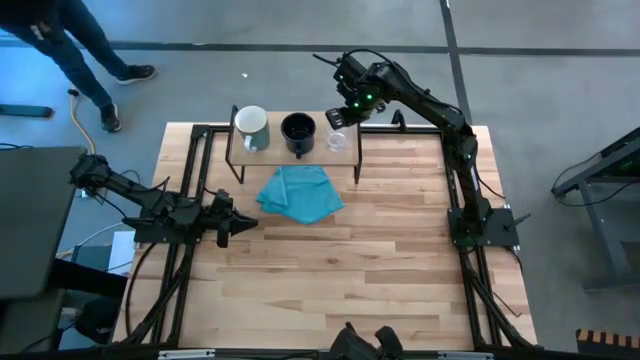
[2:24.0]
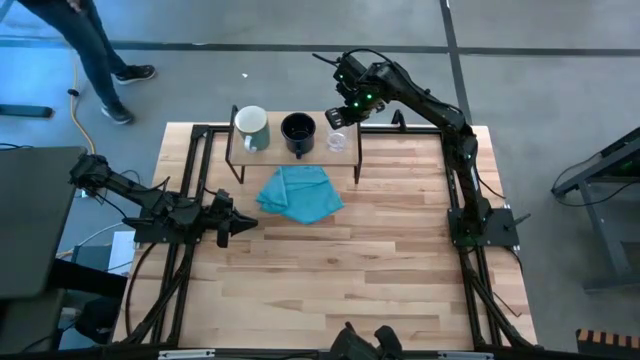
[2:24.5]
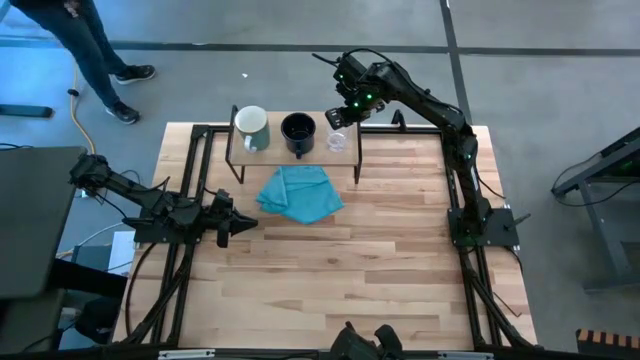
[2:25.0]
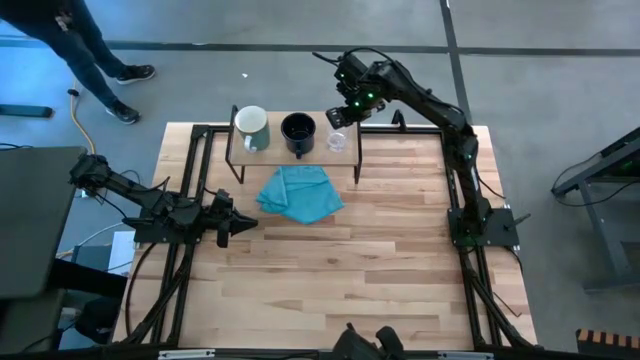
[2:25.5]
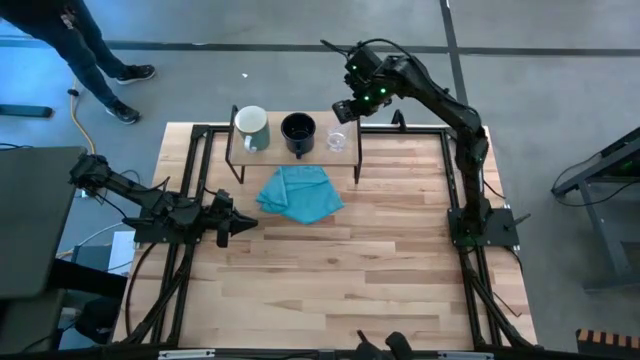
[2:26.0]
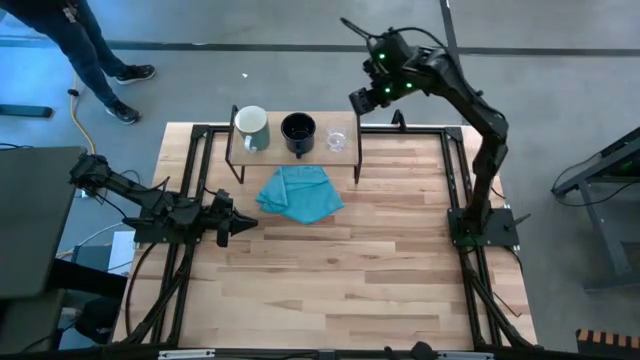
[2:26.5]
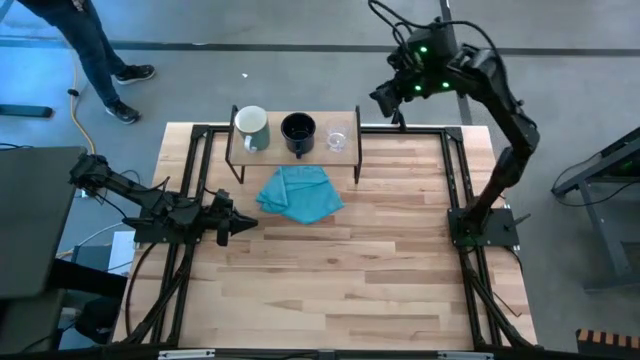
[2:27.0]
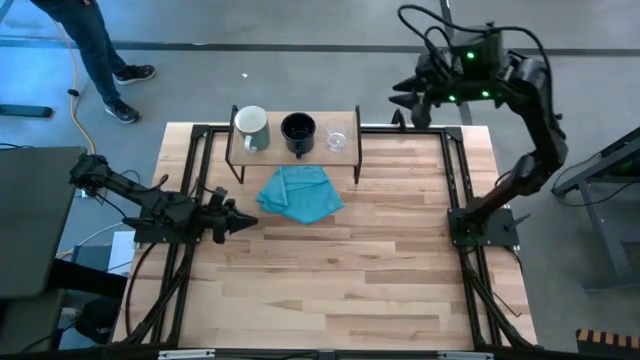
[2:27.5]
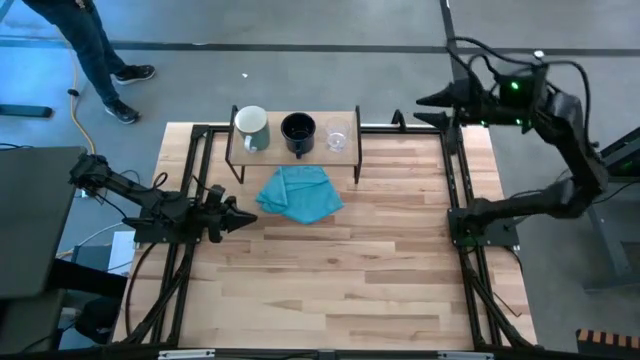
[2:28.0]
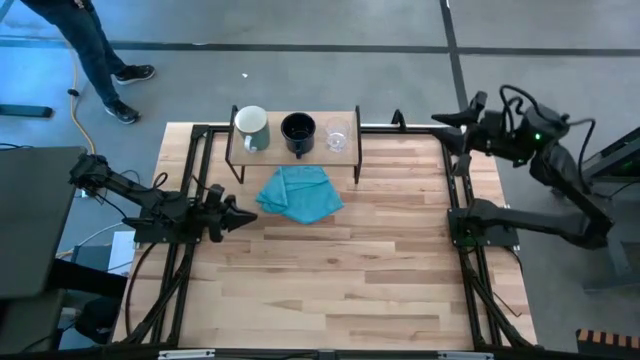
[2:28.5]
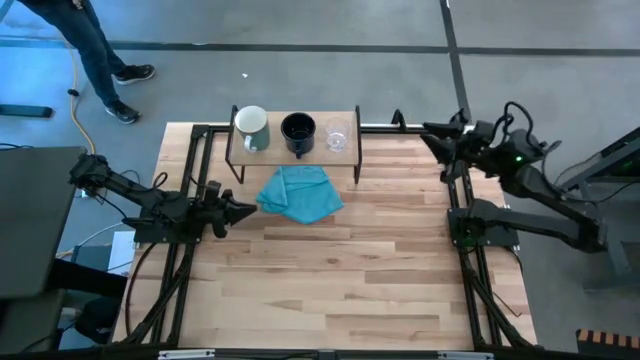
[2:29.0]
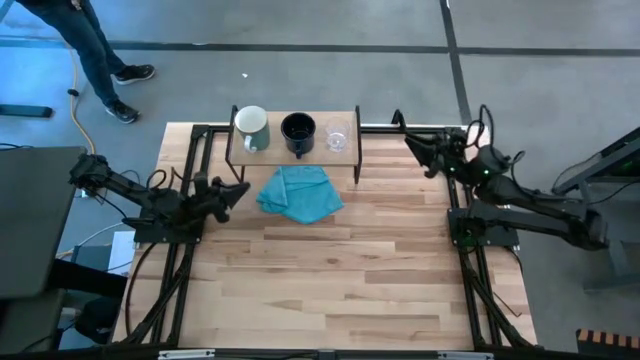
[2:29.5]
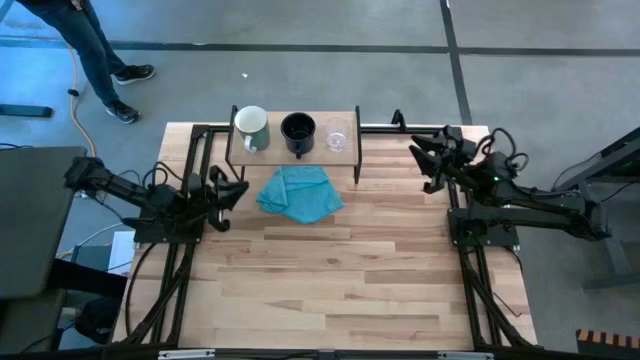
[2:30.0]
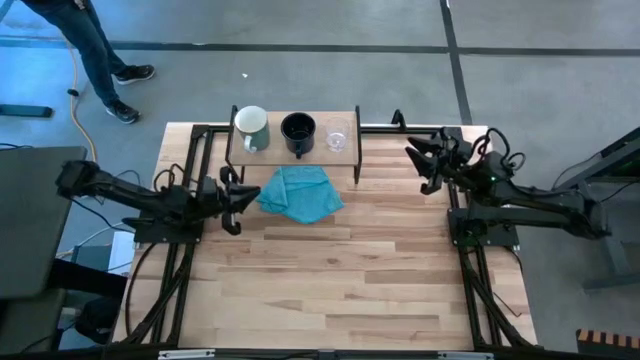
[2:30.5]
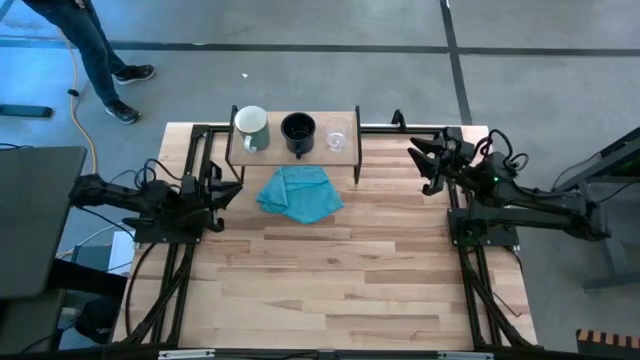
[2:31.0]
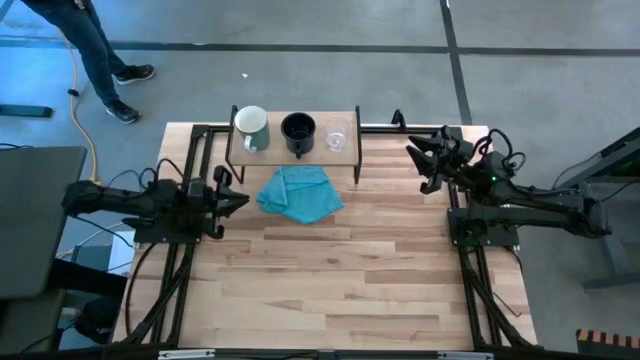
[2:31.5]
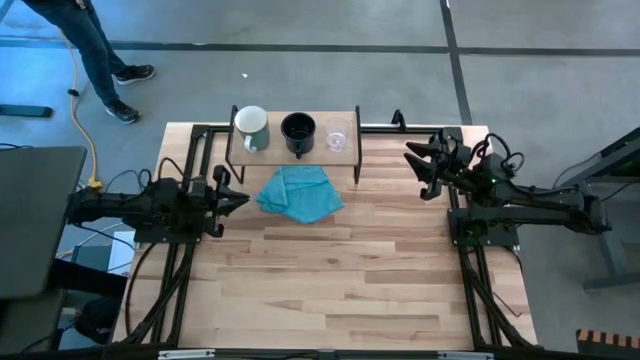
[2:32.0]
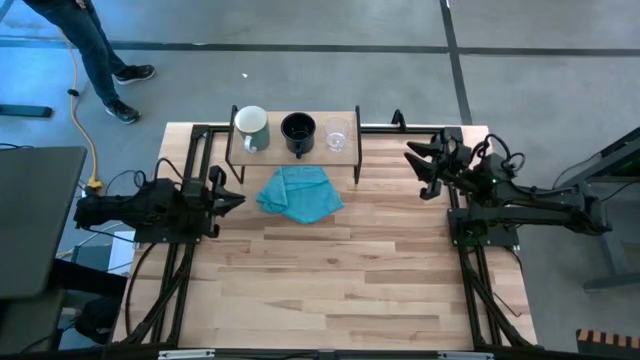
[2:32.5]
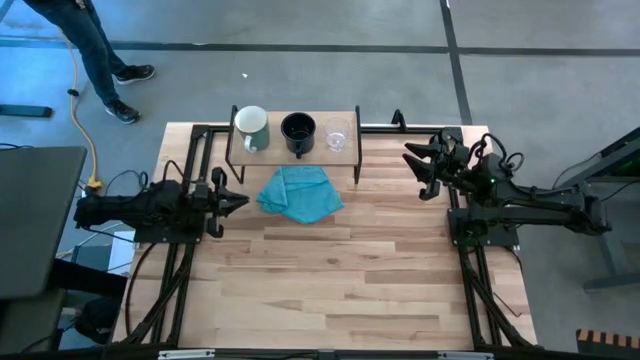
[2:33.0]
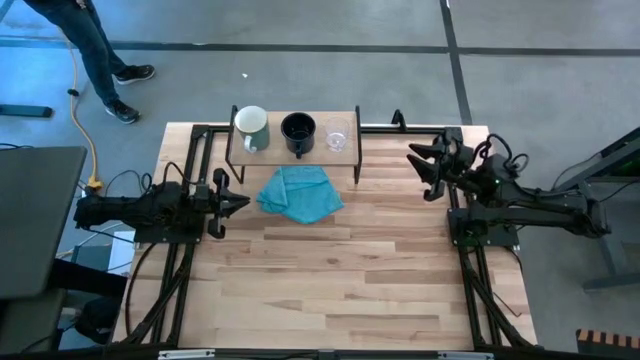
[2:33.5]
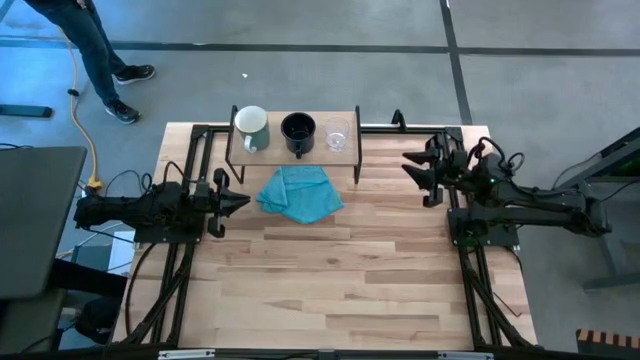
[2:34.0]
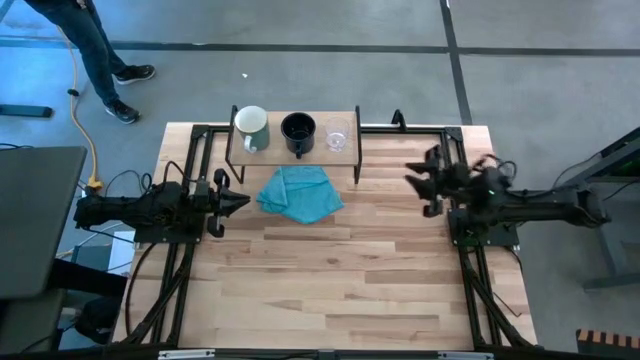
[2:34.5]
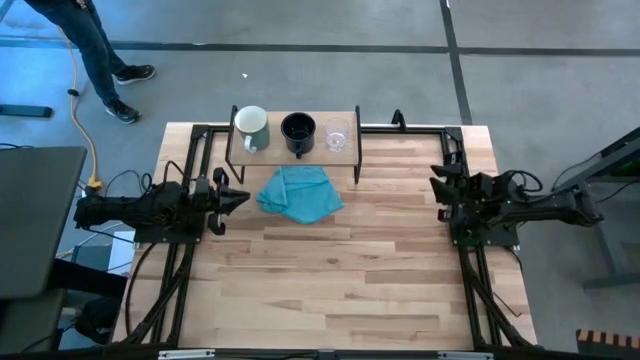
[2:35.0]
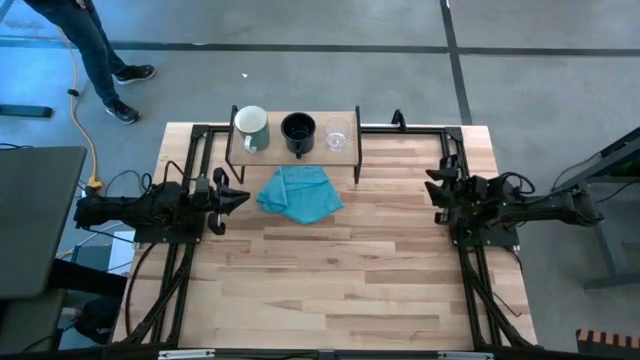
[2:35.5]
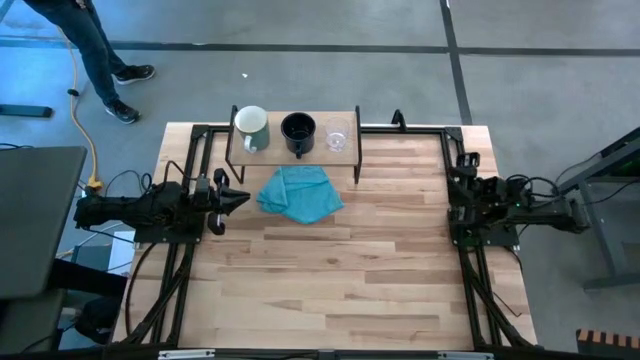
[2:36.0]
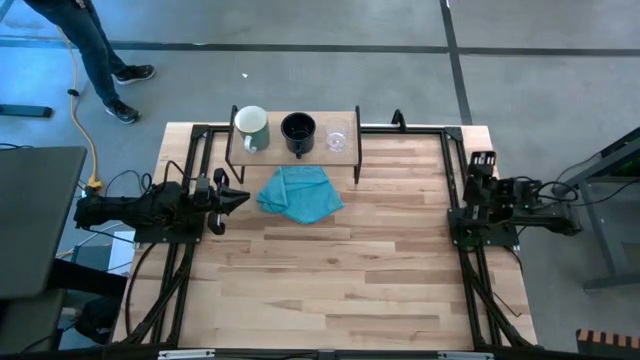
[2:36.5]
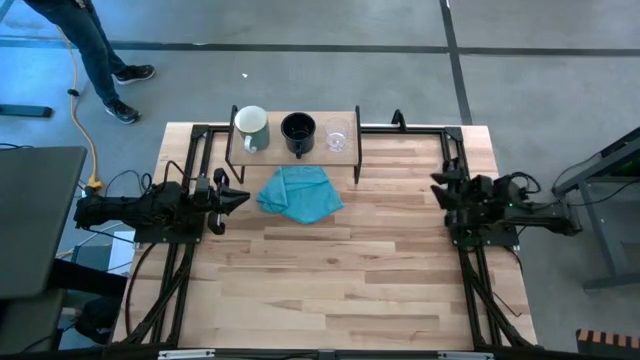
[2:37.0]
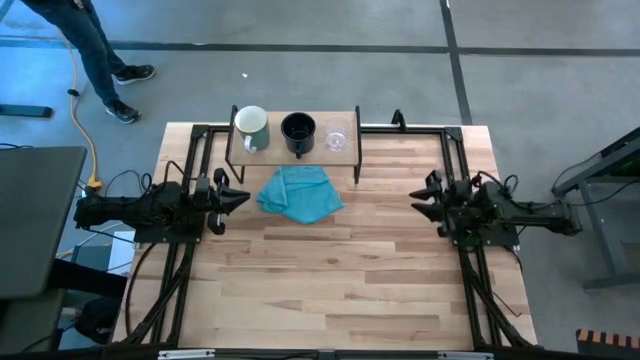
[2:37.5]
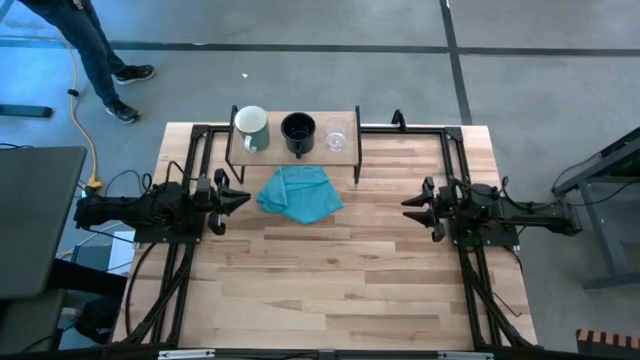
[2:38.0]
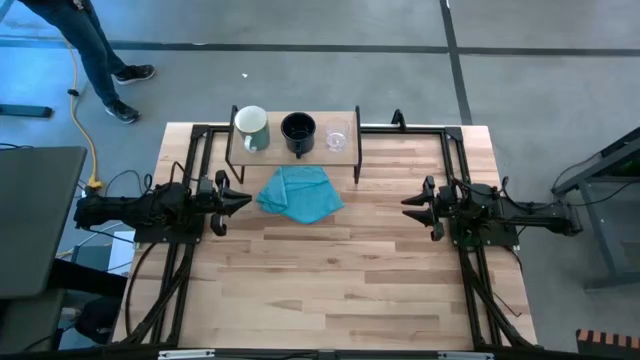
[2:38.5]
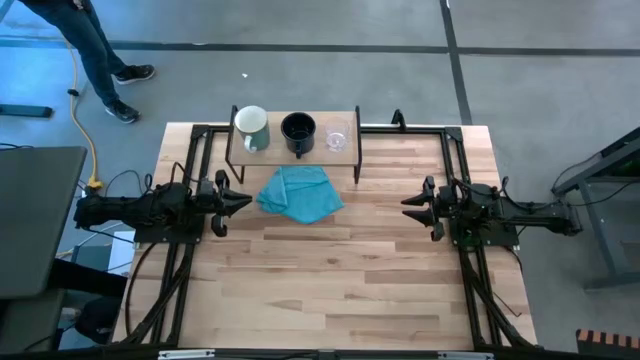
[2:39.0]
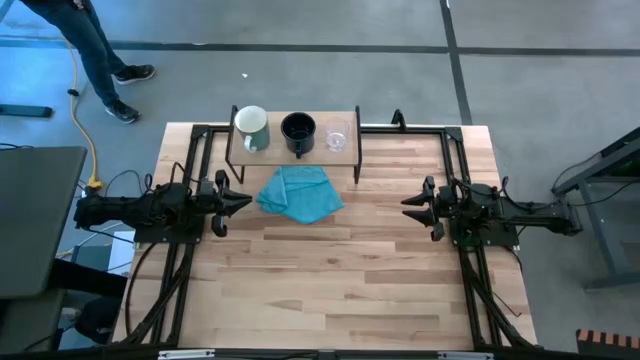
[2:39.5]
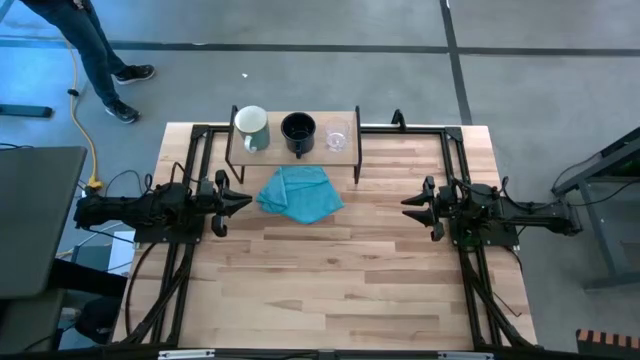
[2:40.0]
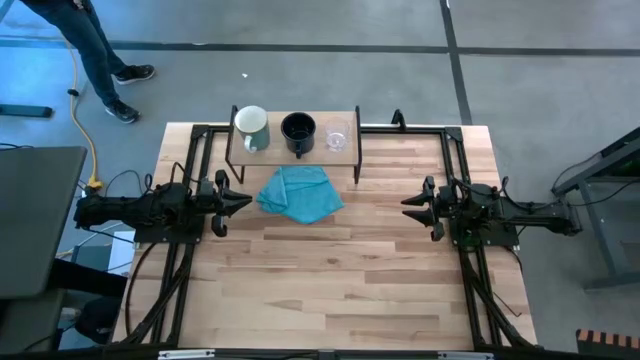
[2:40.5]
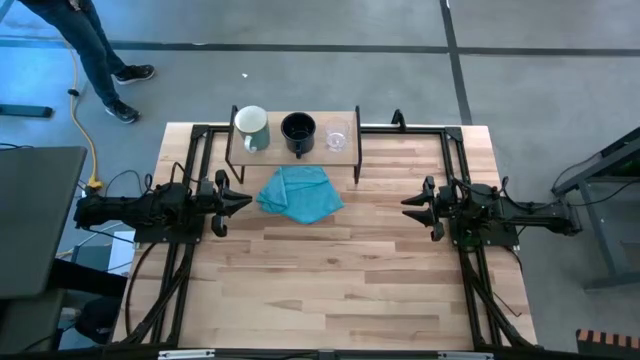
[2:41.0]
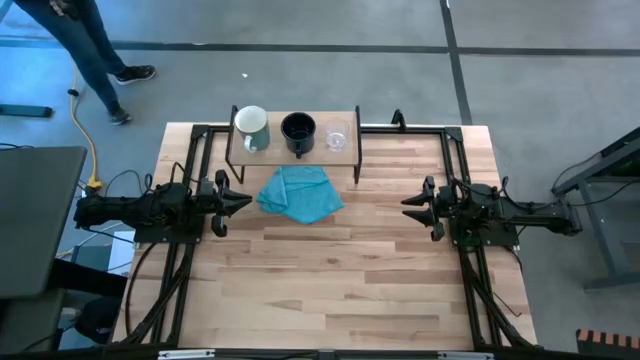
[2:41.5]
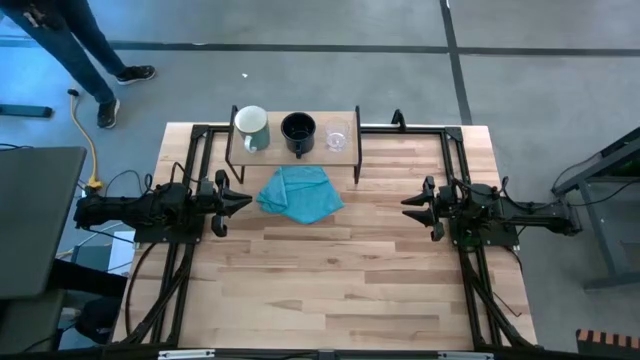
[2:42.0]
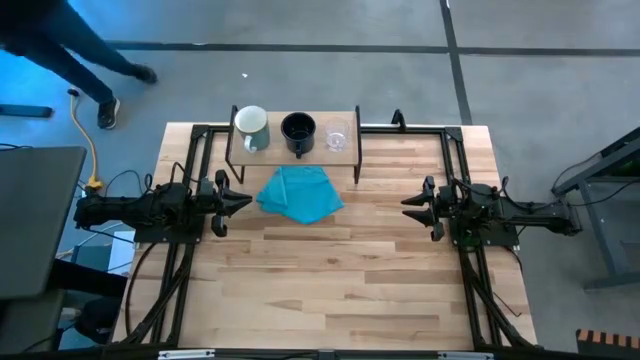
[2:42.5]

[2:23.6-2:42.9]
Task: Stack small to large cups/mugs on shelf
Return to Home Position

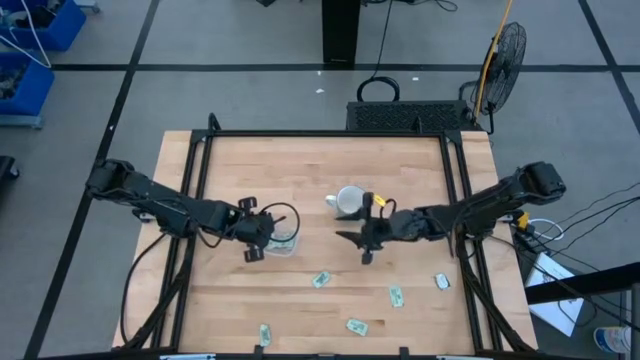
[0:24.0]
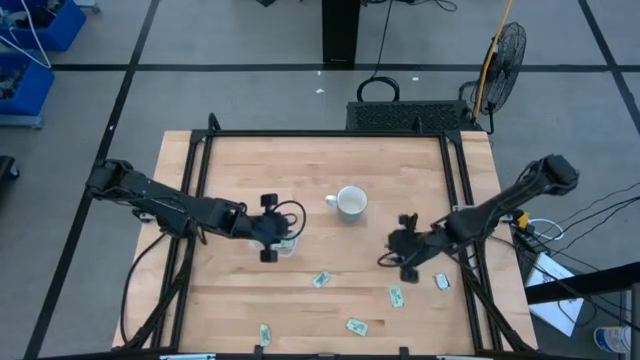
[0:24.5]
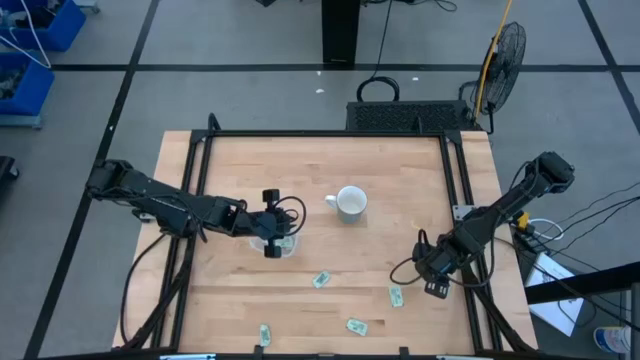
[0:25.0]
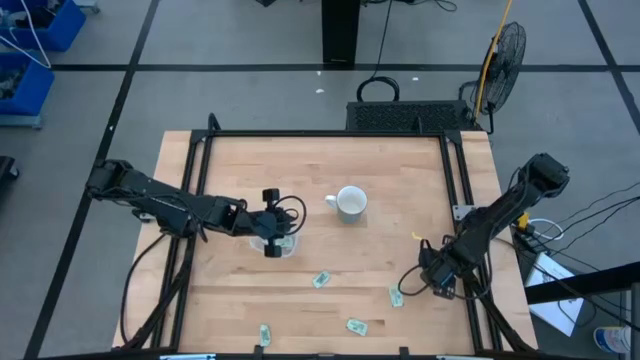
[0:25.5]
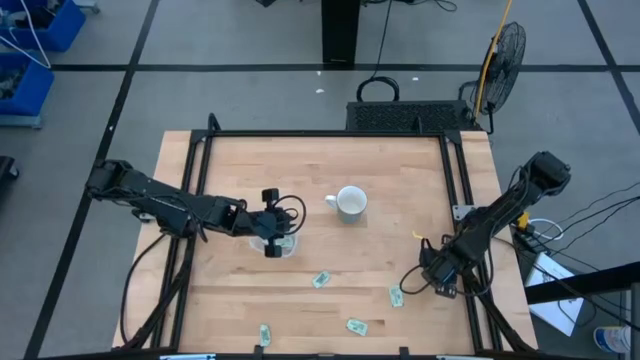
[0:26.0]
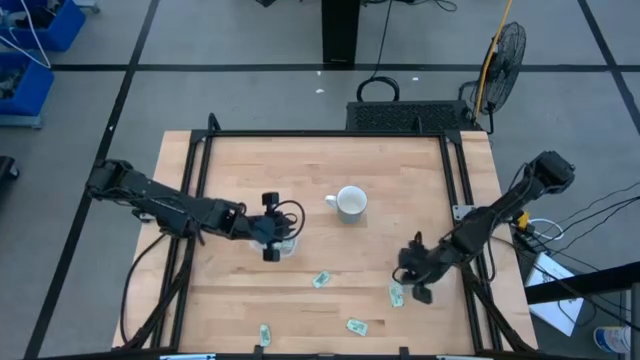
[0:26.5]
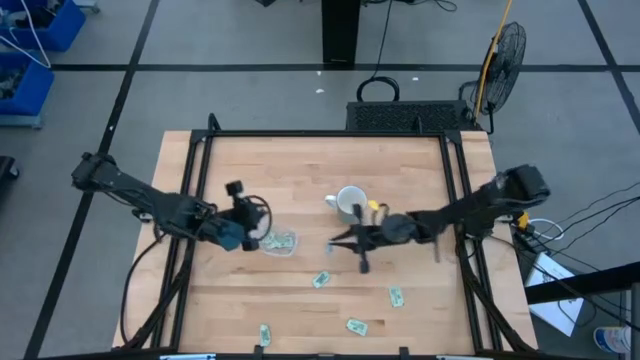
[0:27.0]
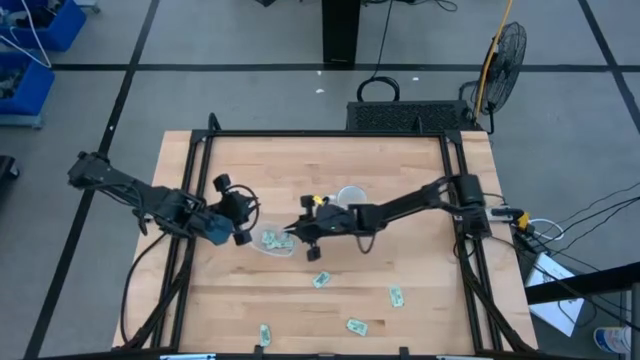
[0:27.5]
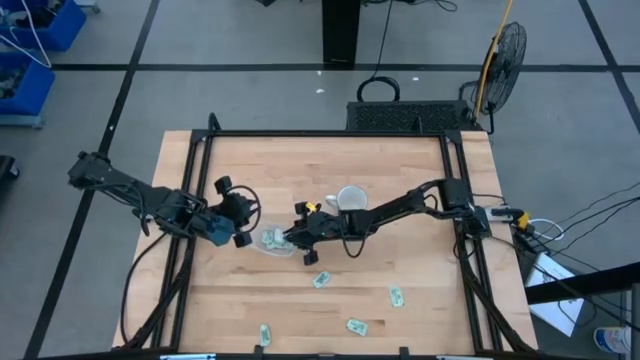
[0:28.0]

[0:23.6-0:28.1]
Task: Pick and place Stevia / Truvia into bins
Put the white stevia packet into the transparent bin
